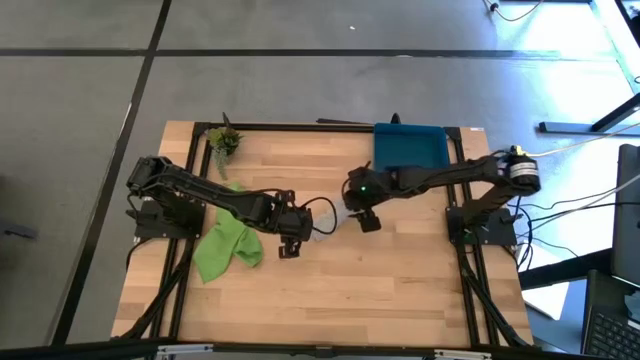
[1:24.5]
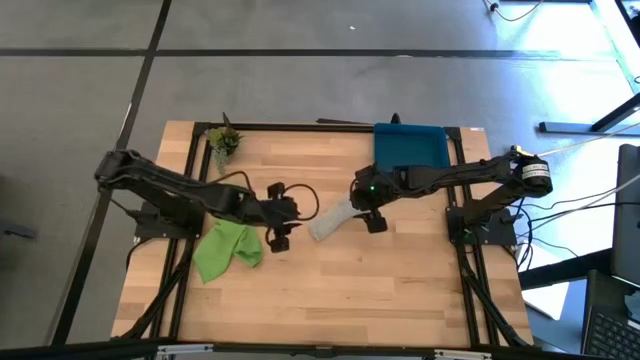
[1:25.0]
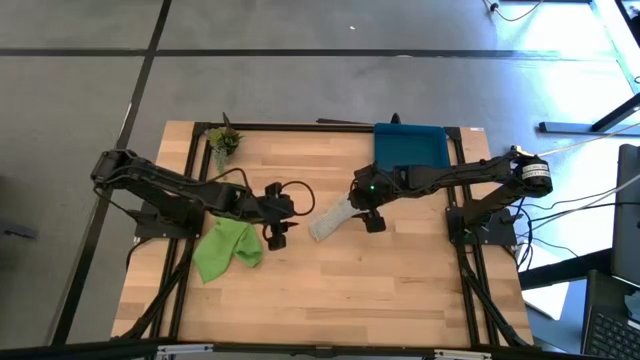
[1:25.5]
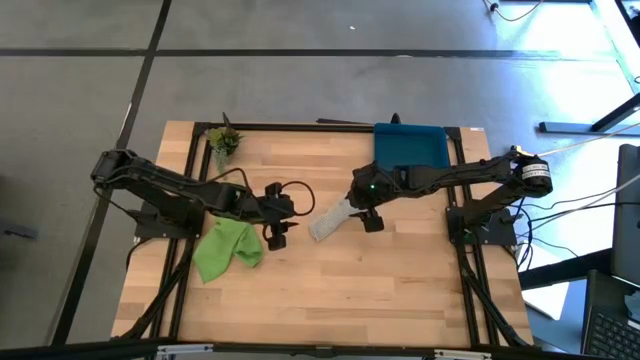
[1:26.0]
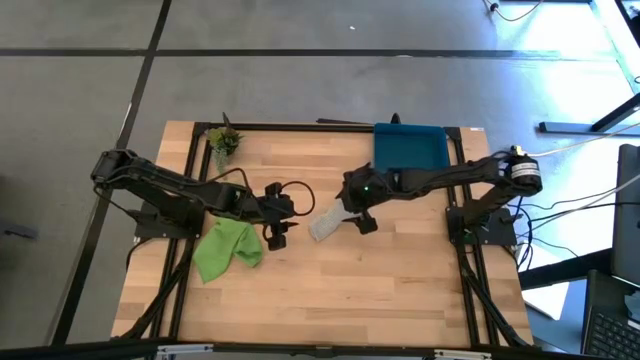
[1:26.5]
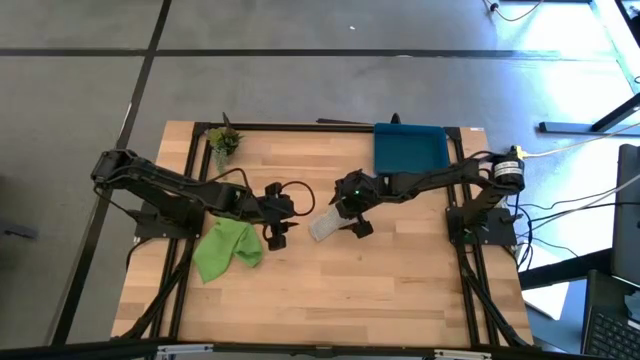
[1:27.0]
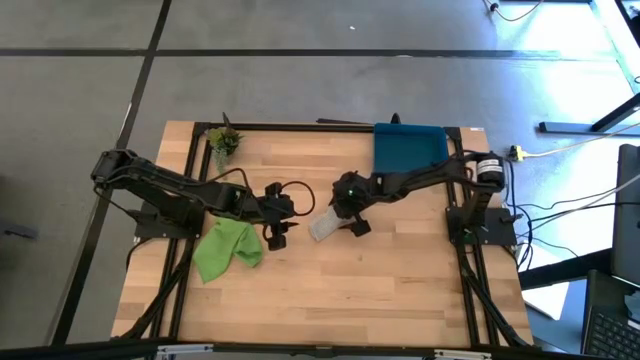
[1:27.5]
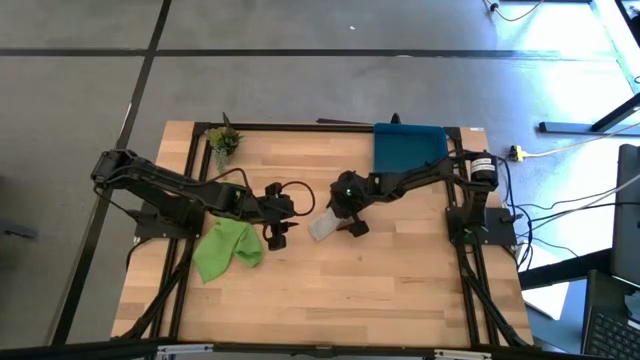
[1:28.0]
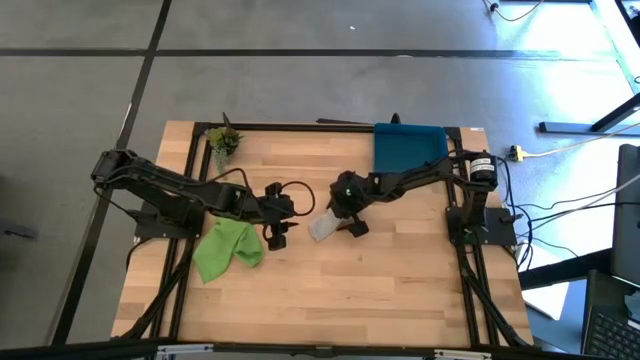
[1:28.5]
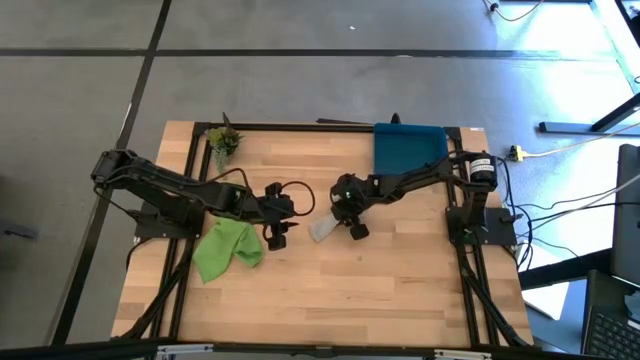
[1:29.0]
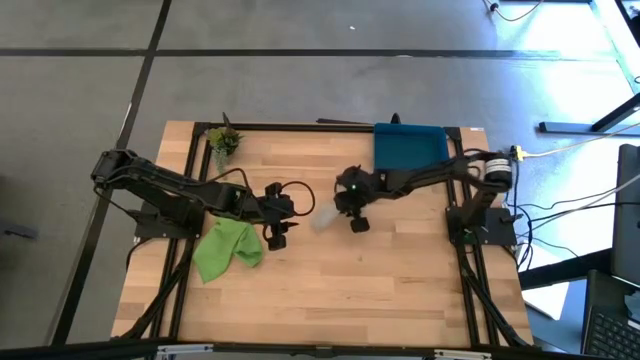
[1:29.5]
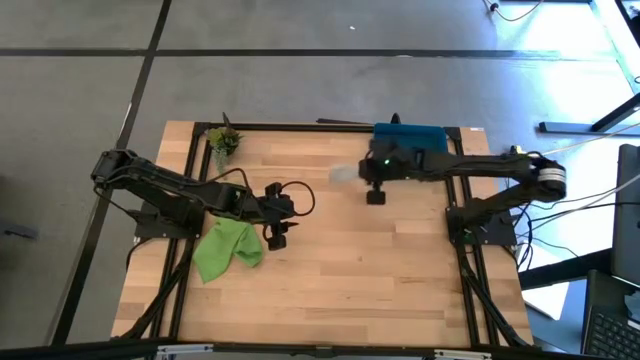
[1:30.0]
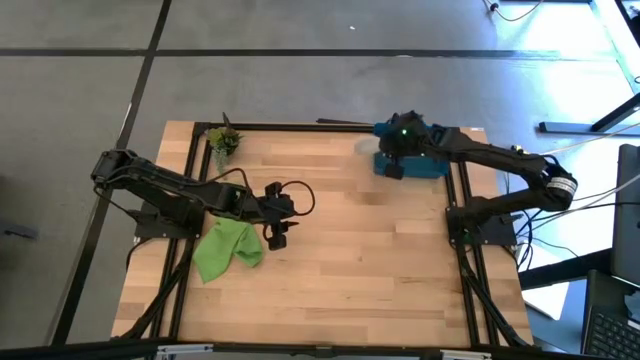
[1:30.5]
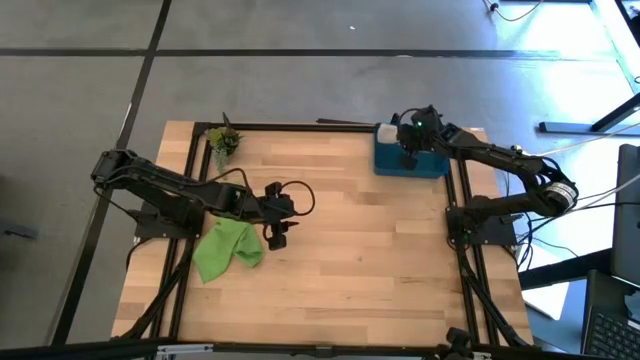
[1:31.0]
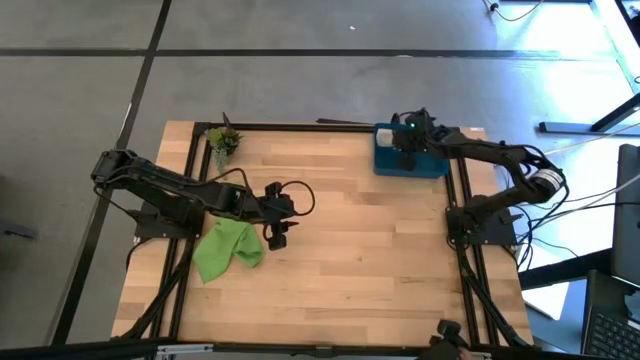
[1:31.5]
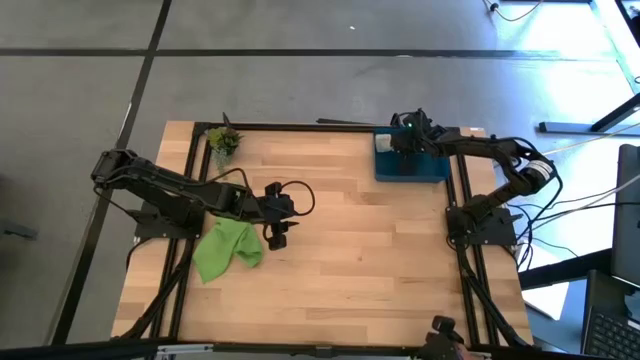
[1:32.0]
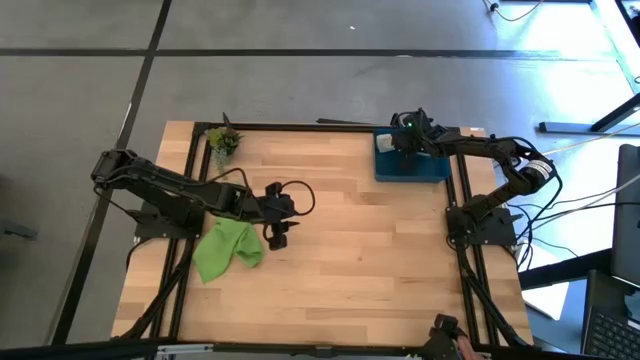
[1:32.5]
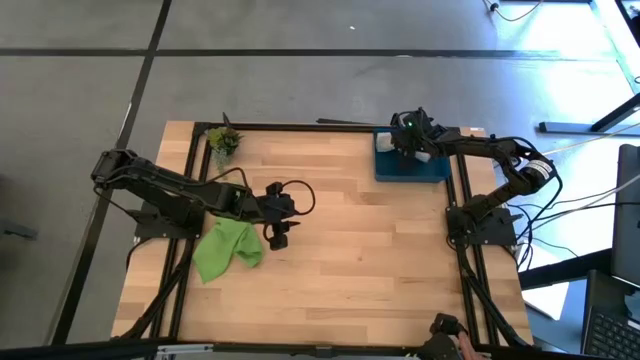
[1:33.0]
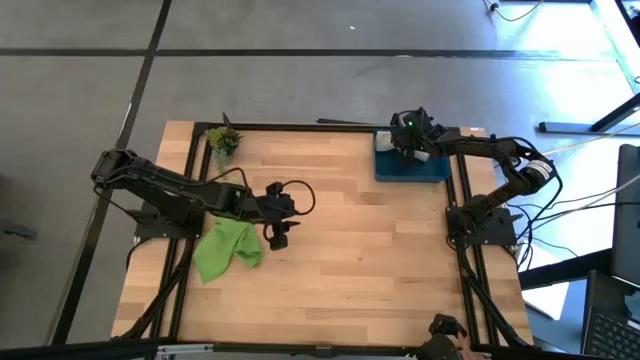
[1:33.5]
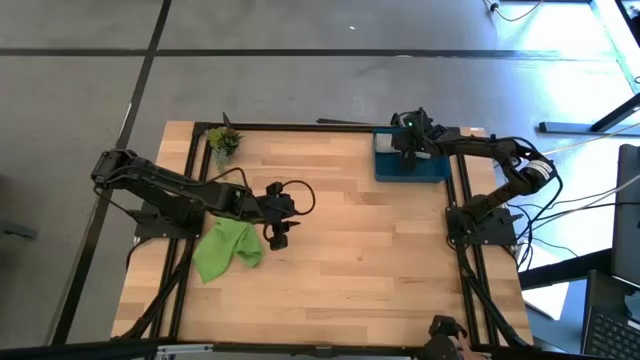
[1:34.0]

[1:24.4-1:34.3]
Task: Roll microfiber towels into tight, uniform cylinder then place into a basket
Put the rolled gray microfiber cloth into the blue bin

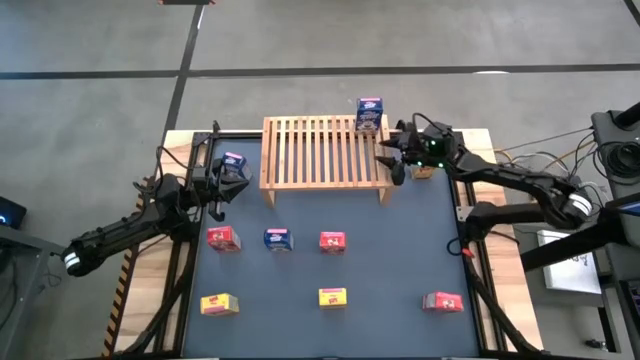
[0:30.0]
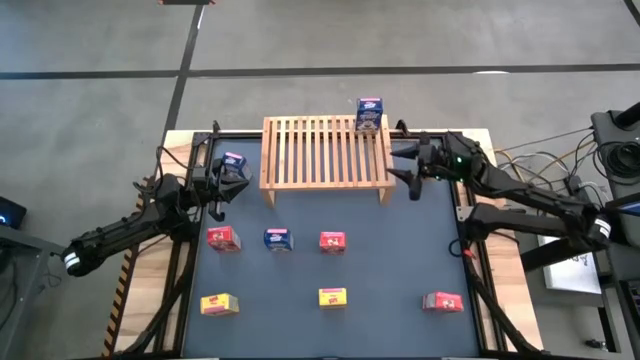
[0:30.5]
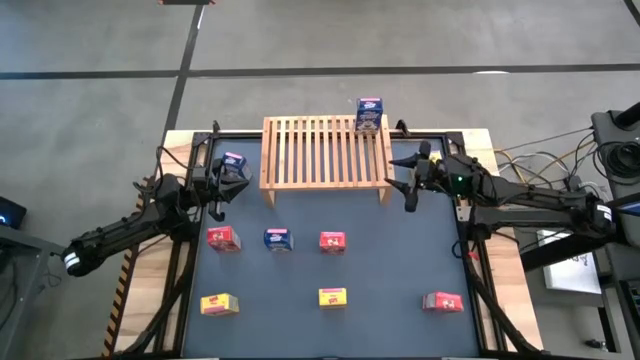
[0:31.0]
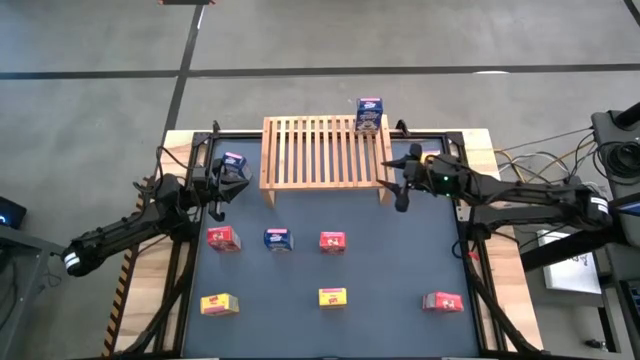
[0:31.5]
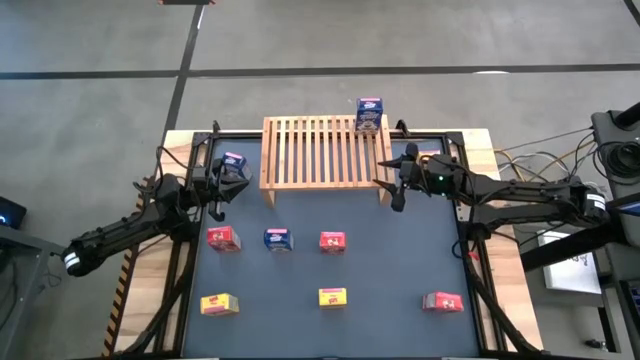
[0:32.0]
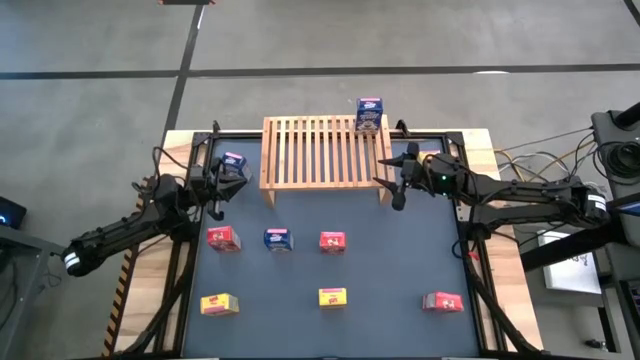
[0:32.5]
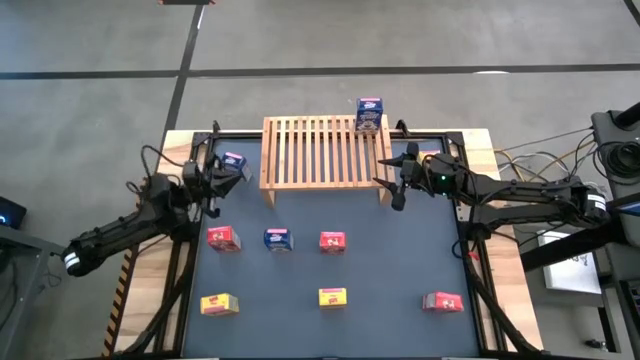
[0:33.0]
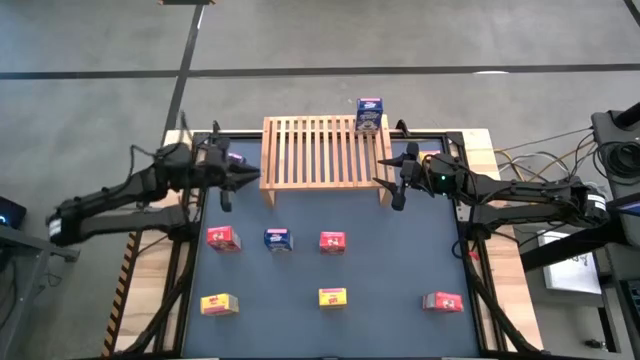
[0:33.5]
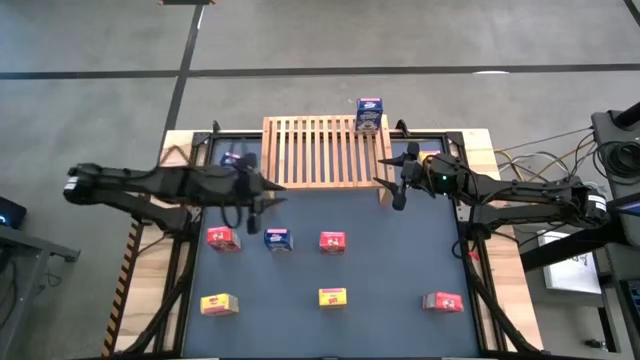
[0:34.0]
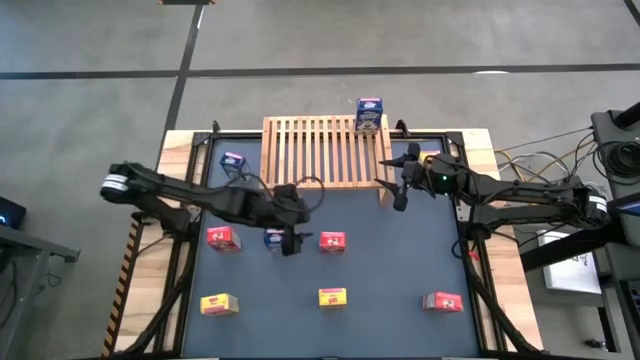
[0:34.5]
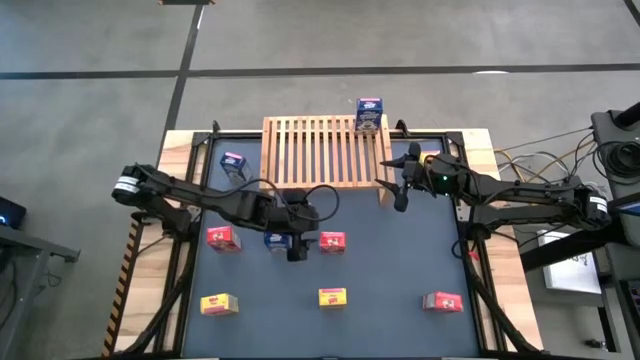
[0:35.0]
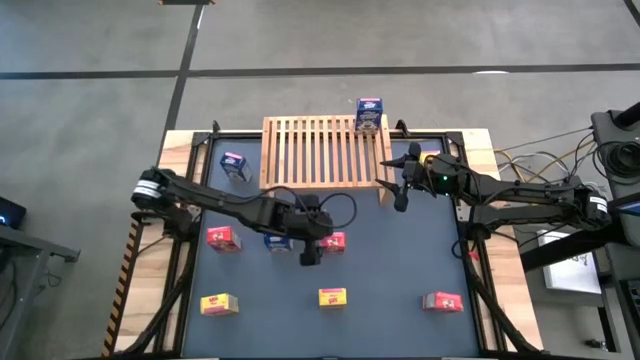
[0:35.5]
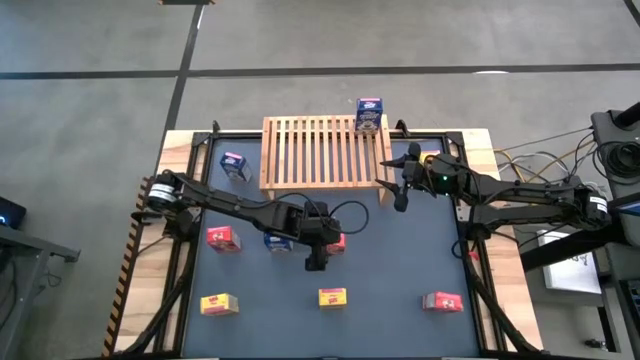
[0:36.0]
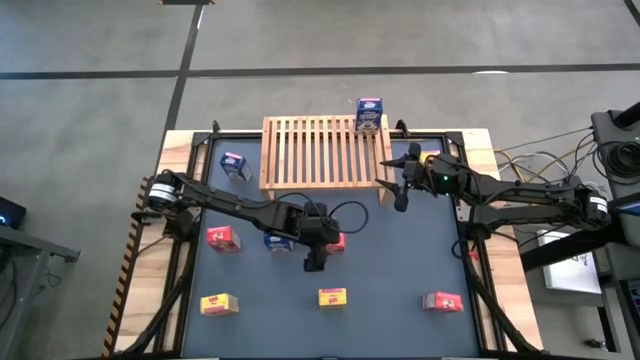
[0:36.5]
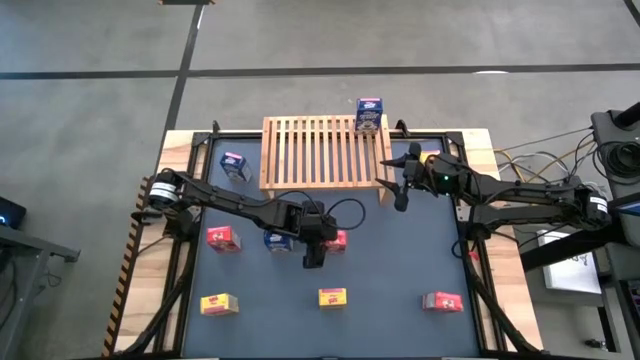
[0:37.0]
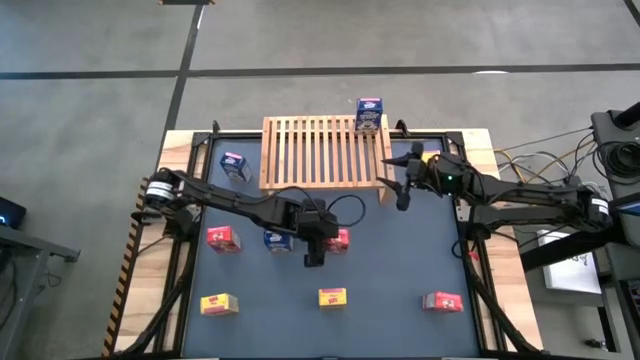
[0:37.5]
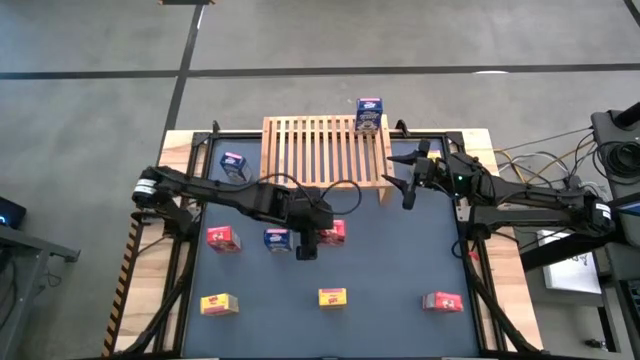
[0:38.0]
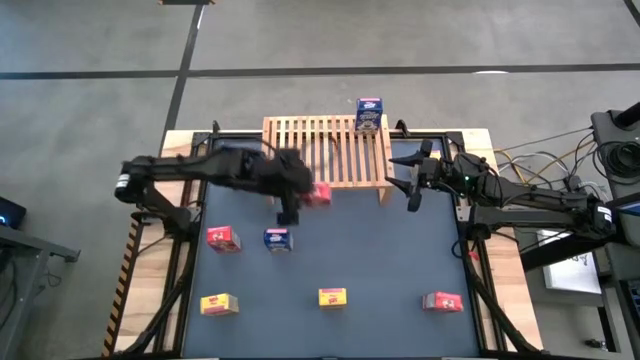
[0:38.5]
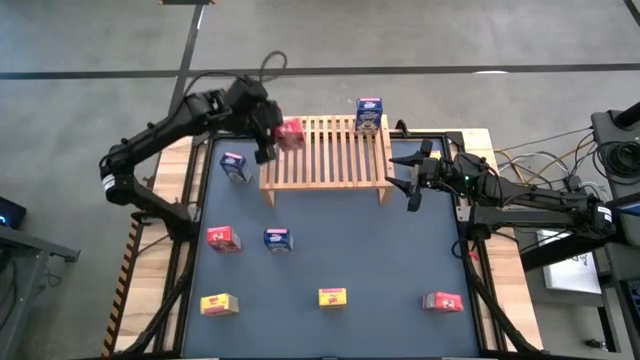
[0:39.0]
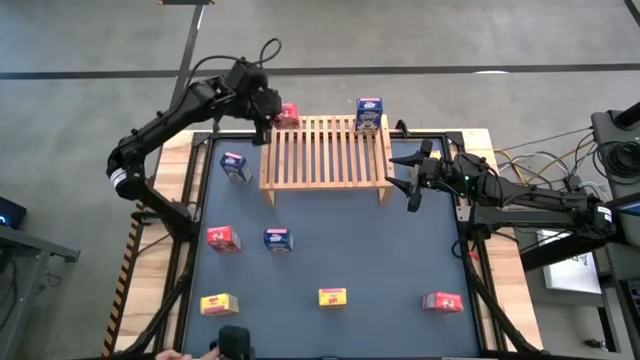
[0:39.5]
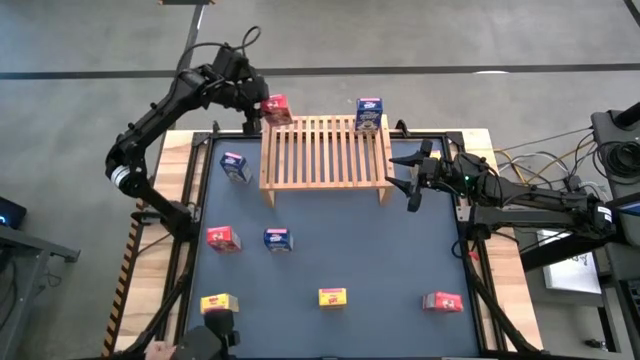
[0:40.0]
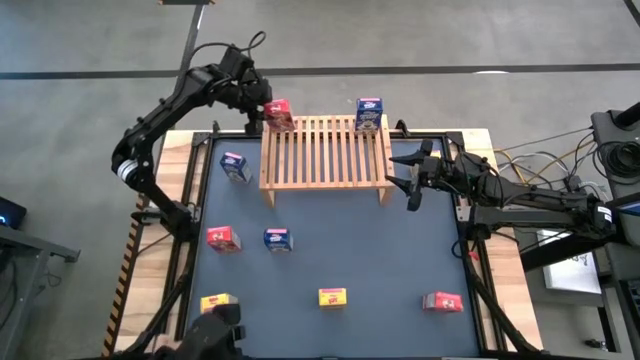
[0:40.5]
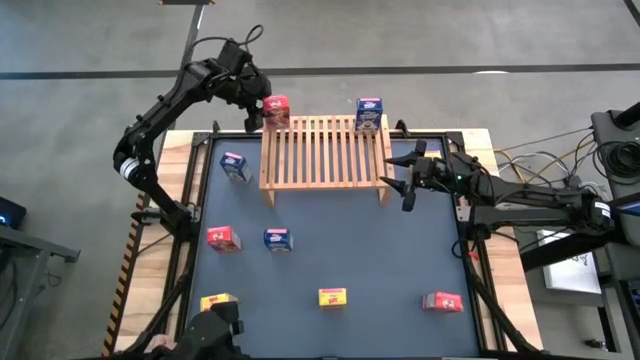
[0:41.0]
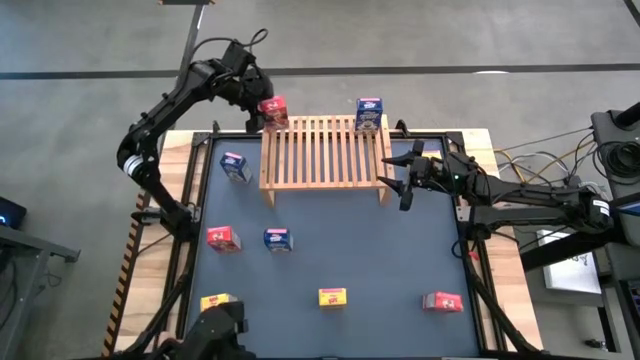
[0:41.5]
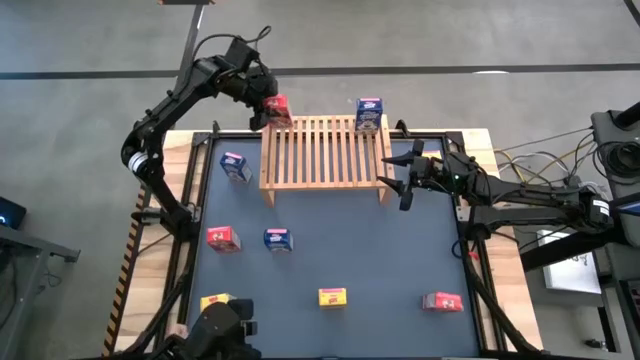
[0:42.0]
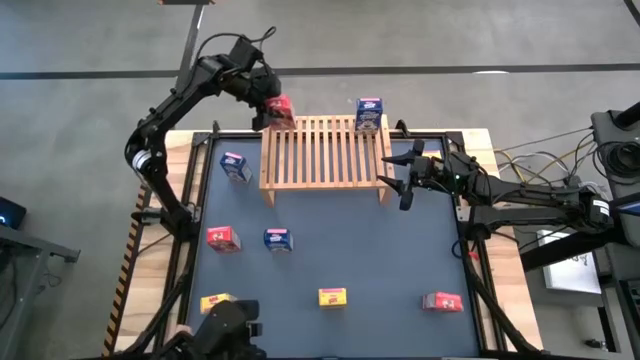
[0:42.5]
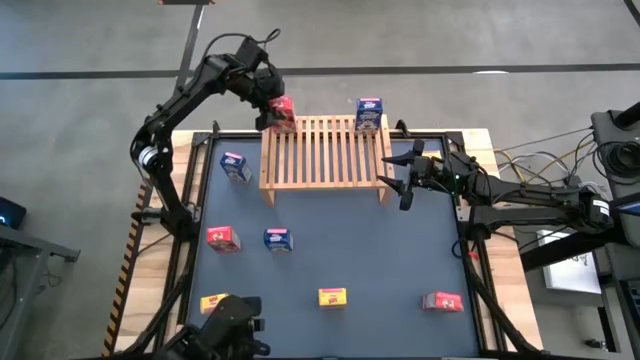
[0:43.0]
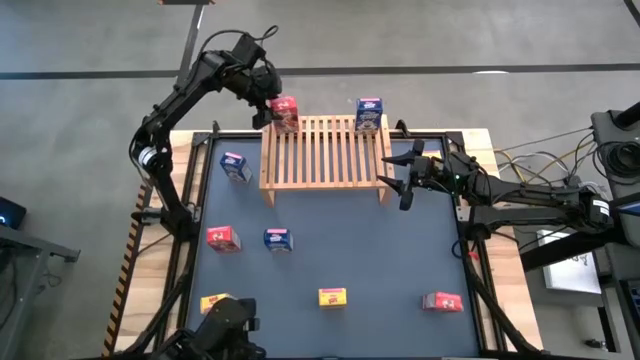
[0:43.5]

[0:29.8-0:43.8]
Task: Stack cereal on shelf
Put the top right red cereal box on the shelf
